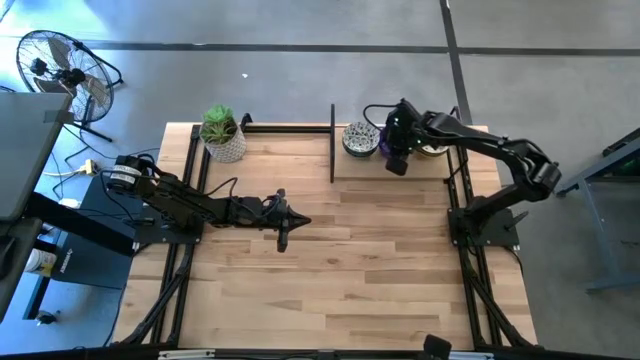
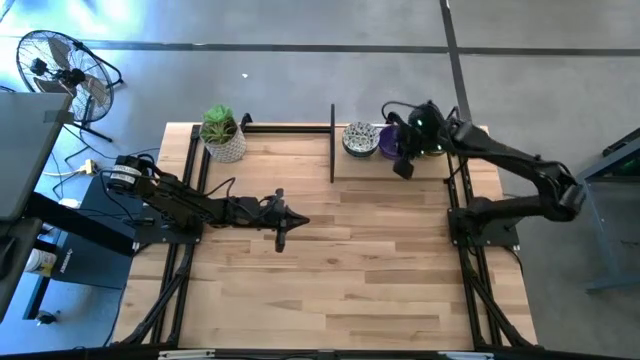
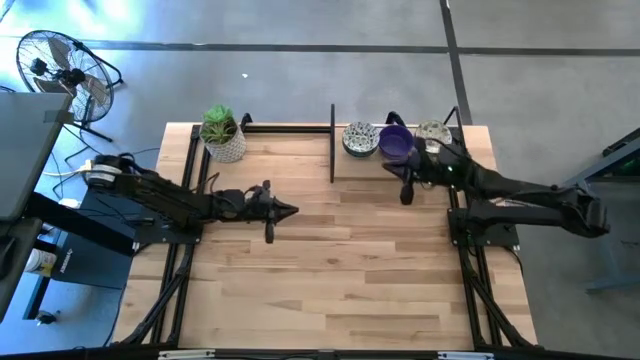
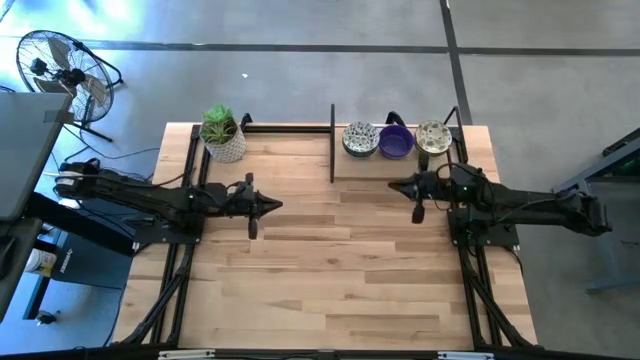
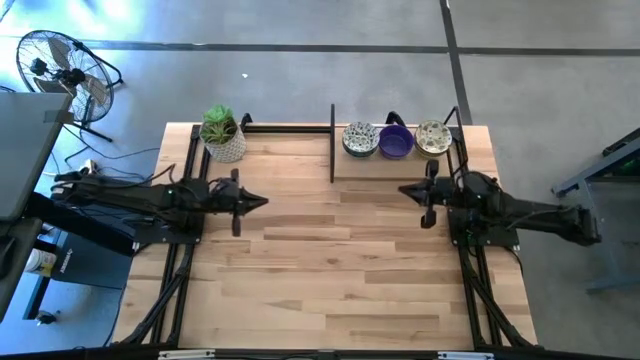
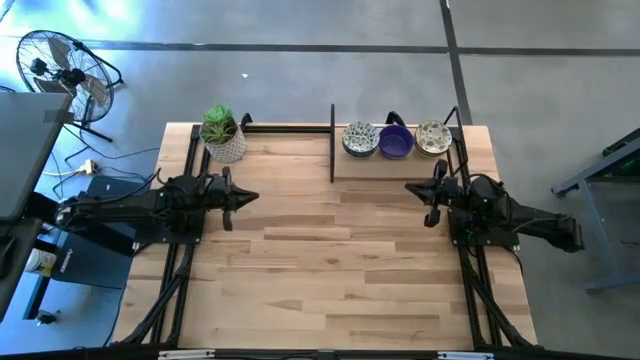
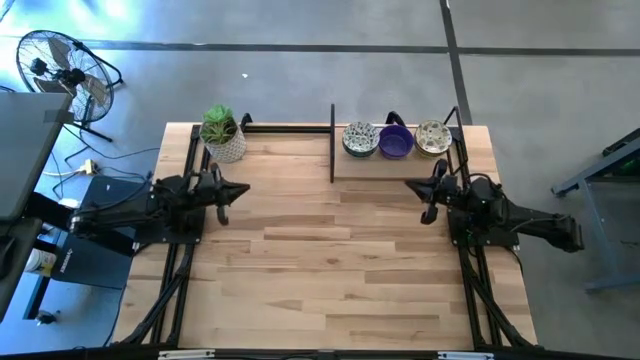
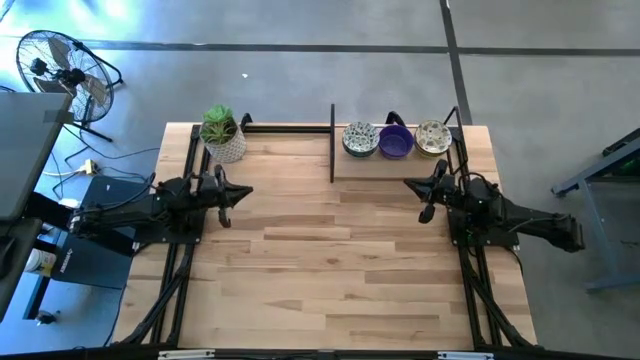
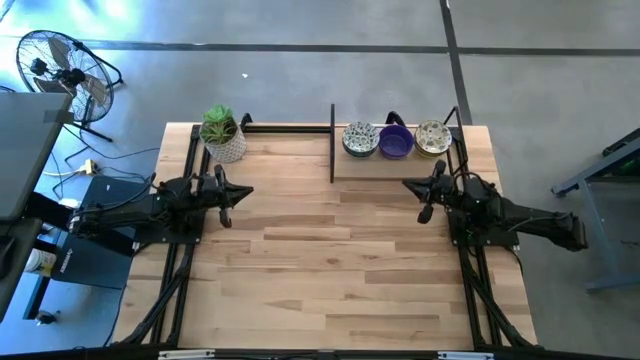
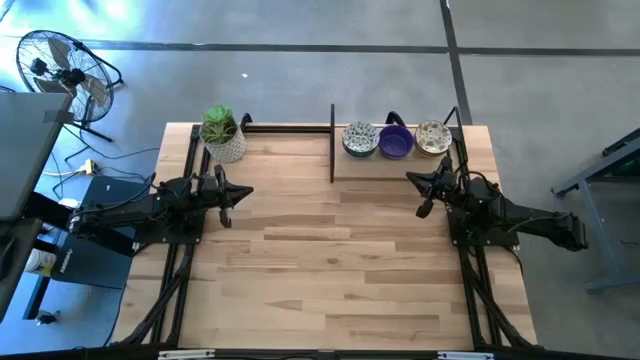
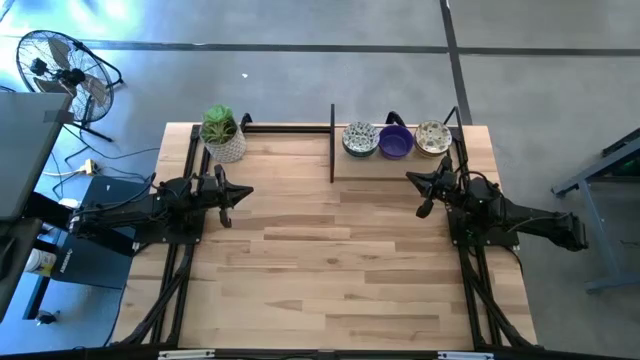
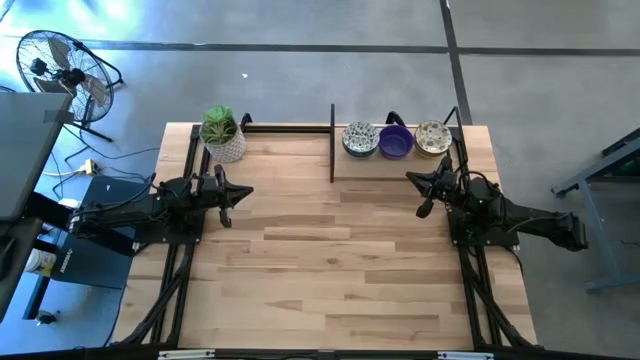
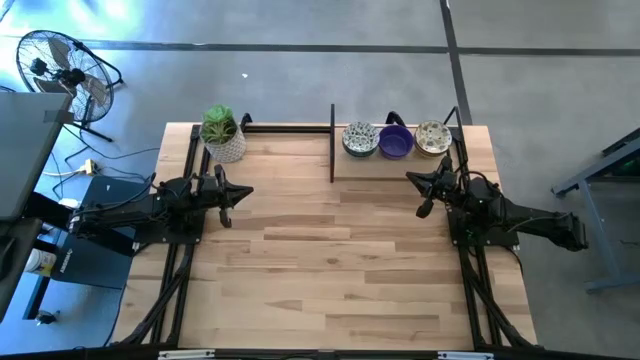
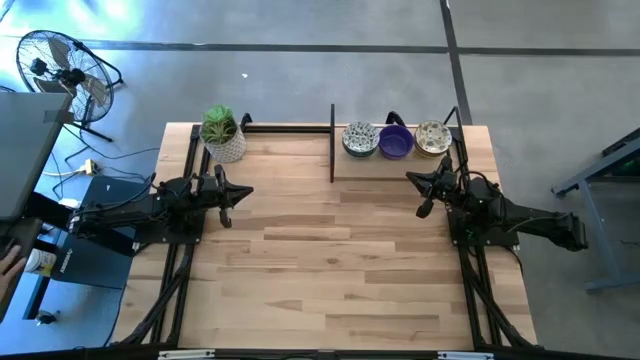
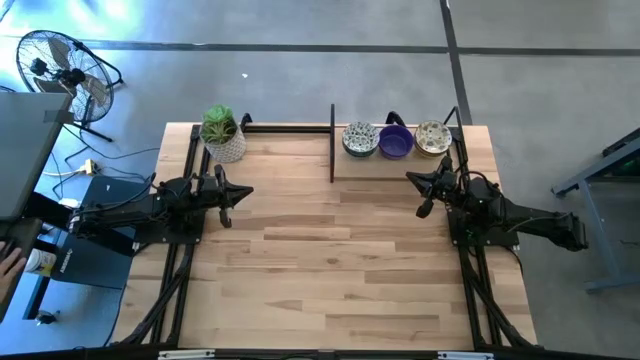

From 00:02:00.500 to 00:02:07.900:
Task: Pick & Place Mini bowls
Return to Home Position

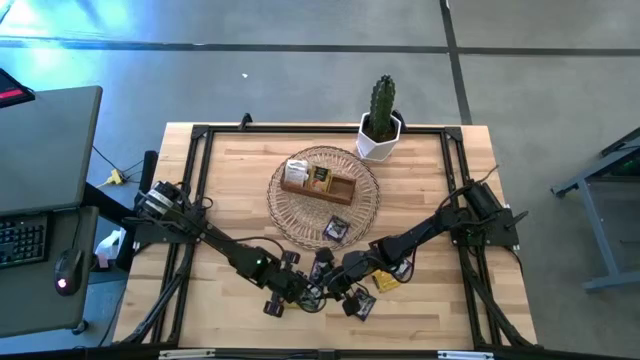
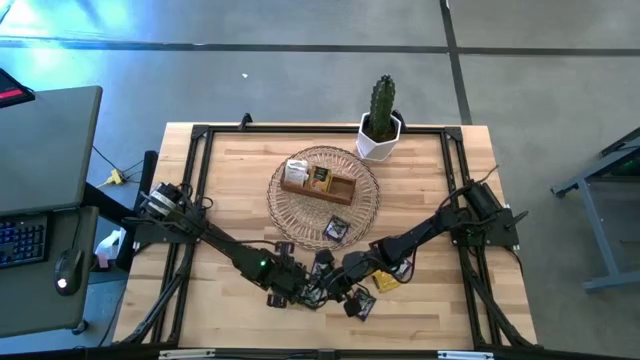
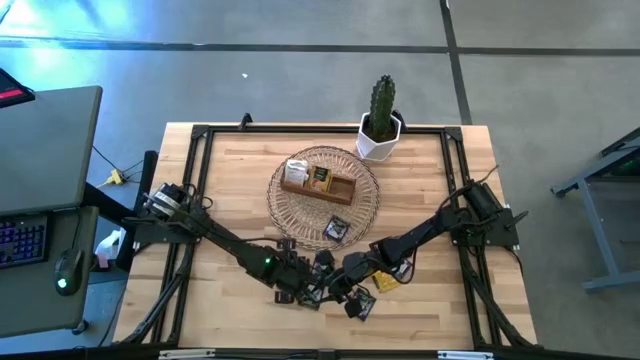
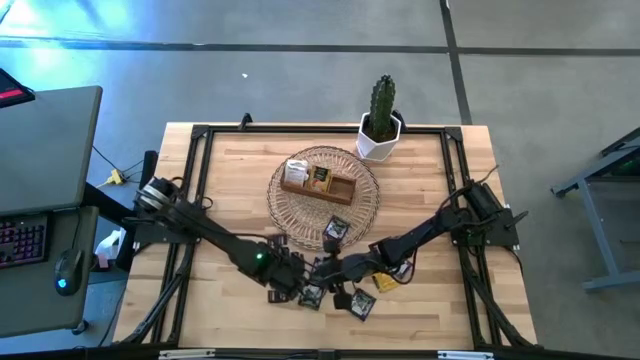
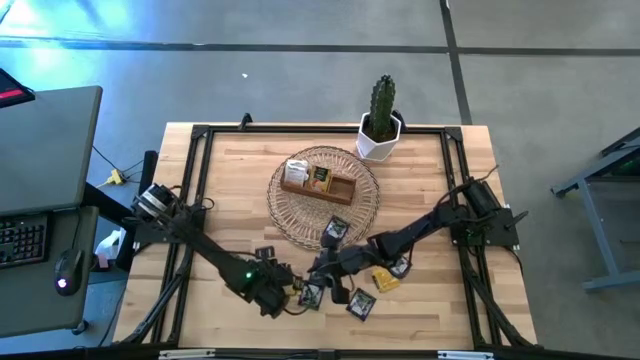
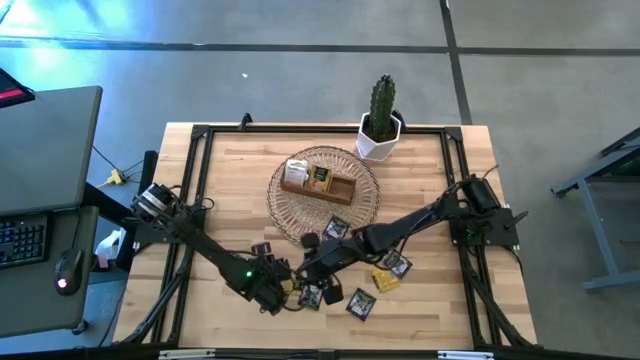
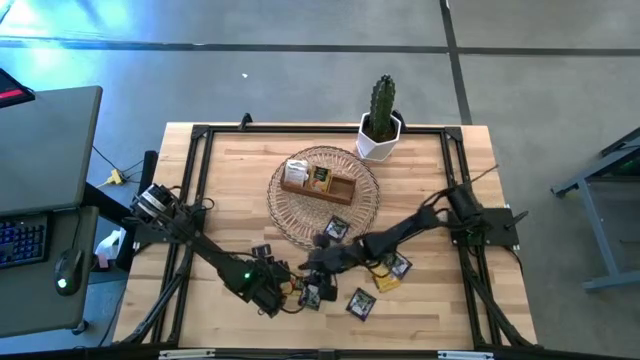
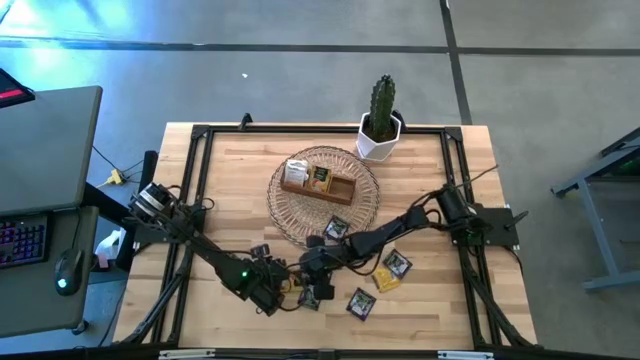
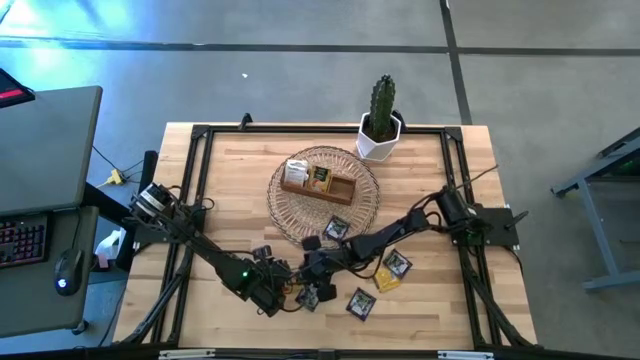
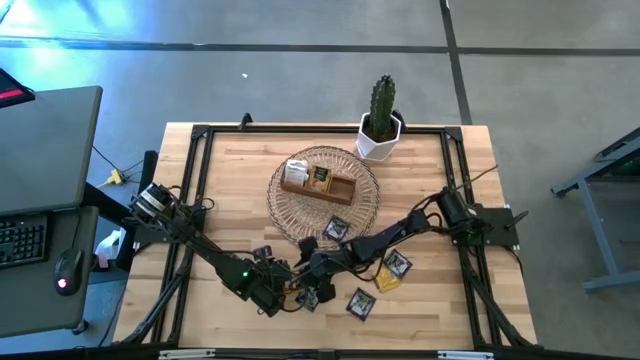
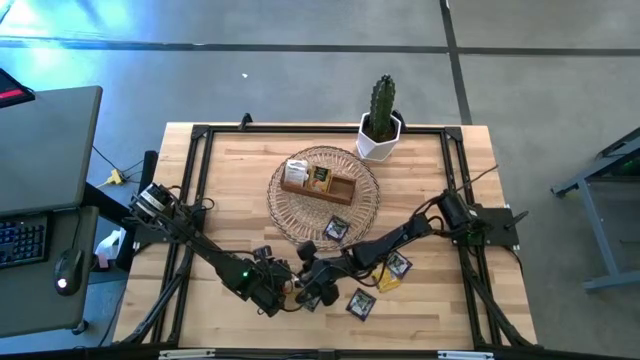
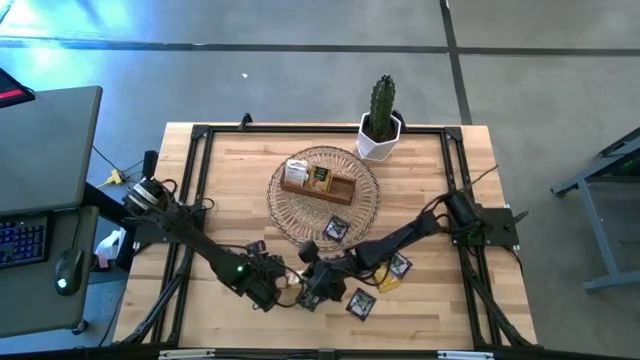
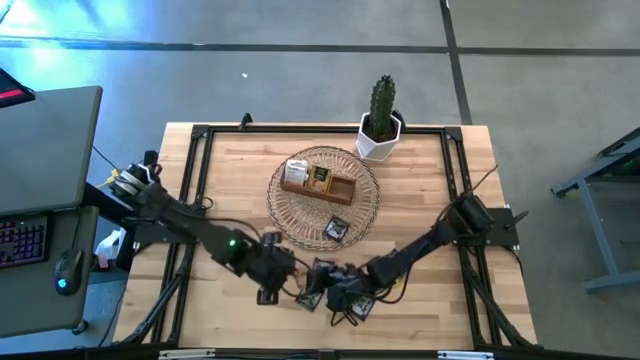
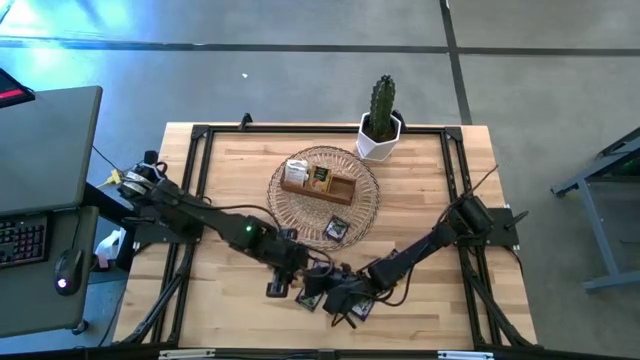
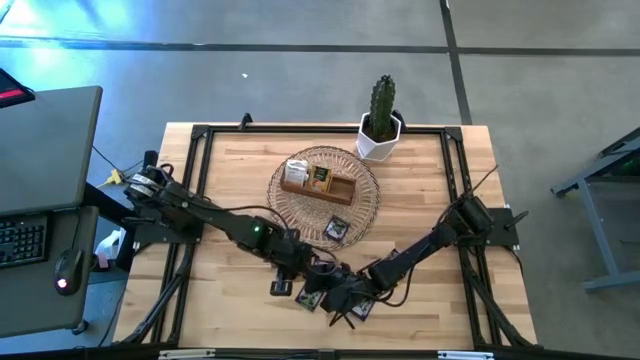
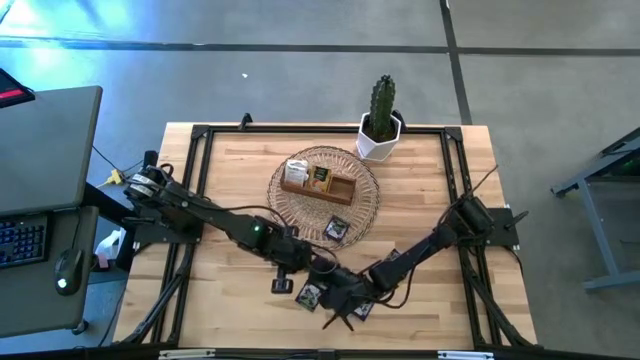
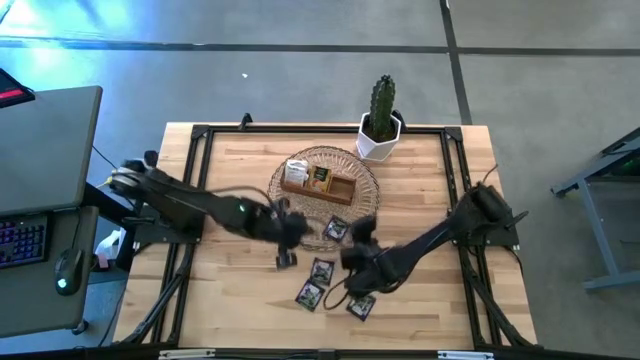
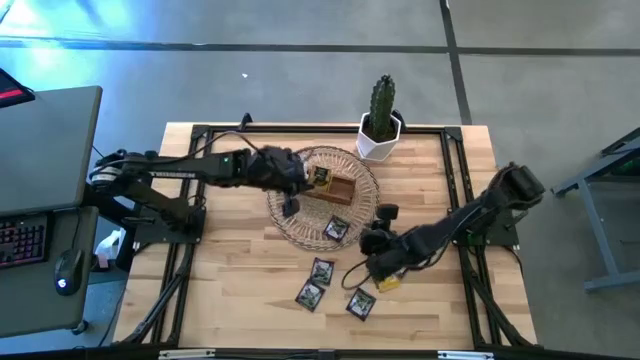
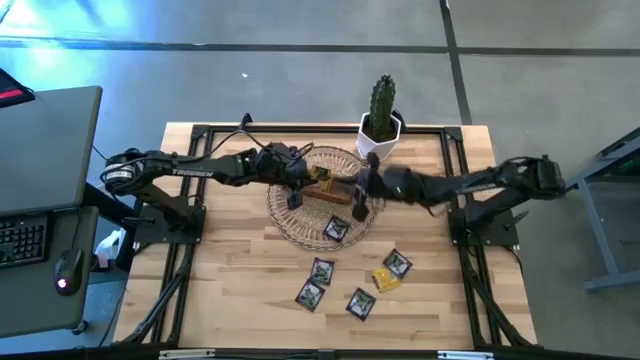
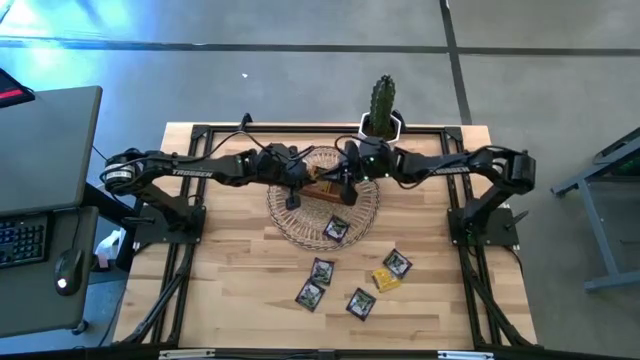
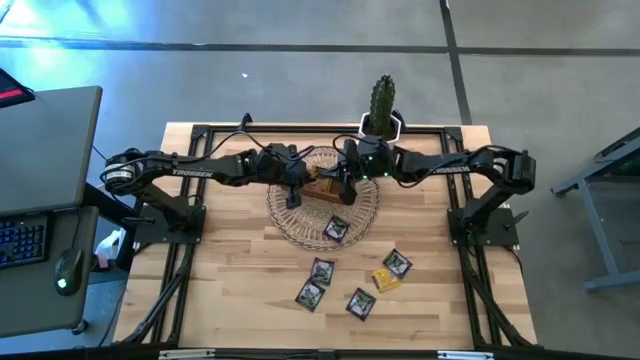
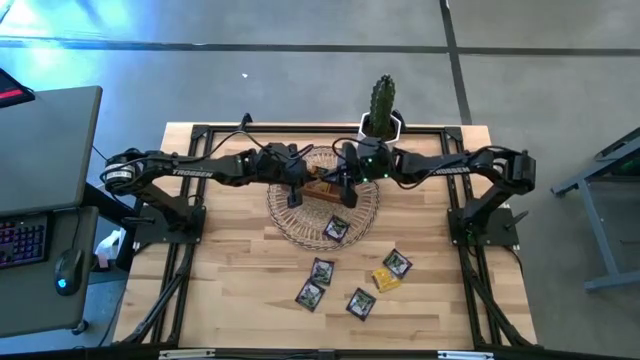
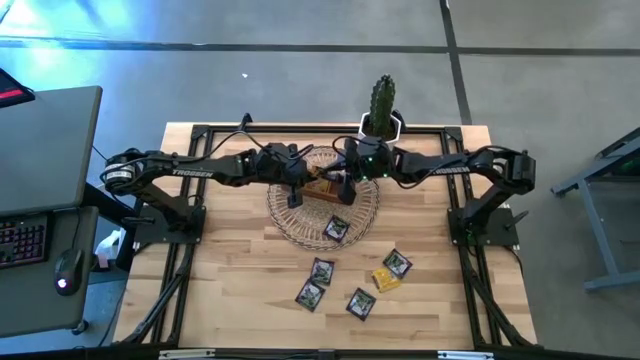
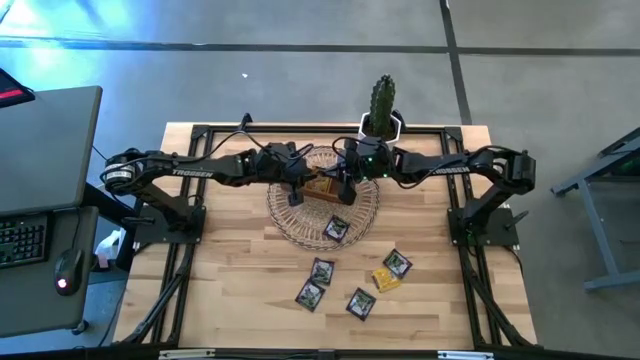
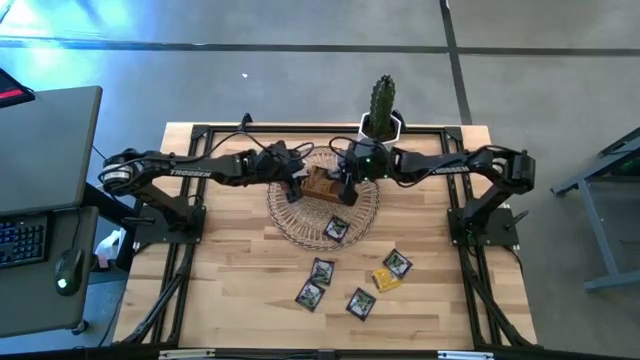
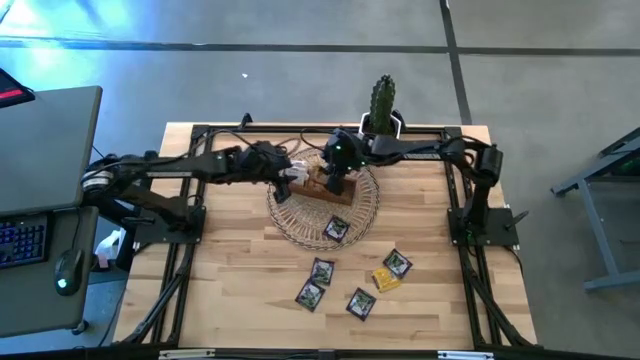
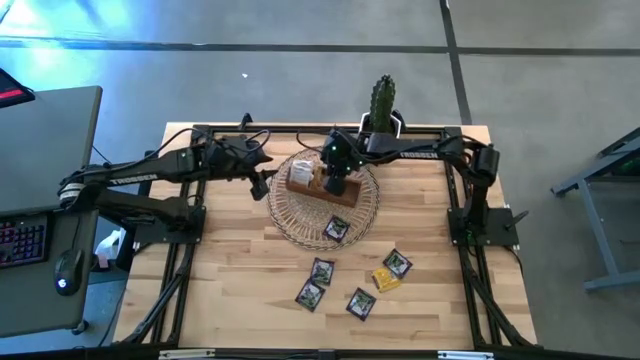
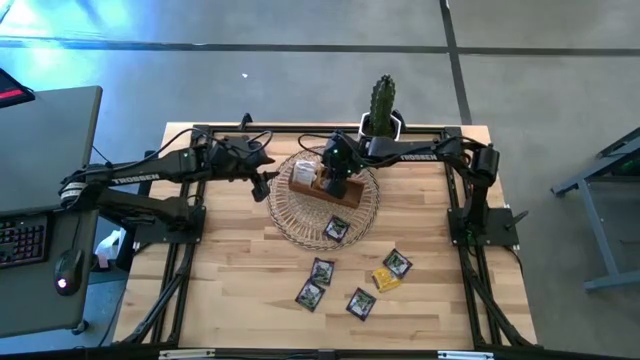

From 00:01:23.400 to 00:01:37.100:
Task: Pick & Place Tea
Put the yellow tea pack into the middle section of the wooden organizer
